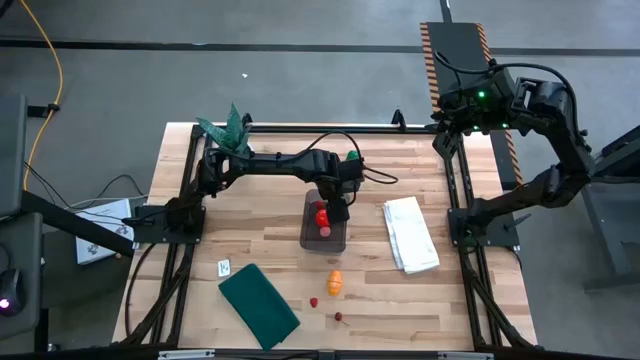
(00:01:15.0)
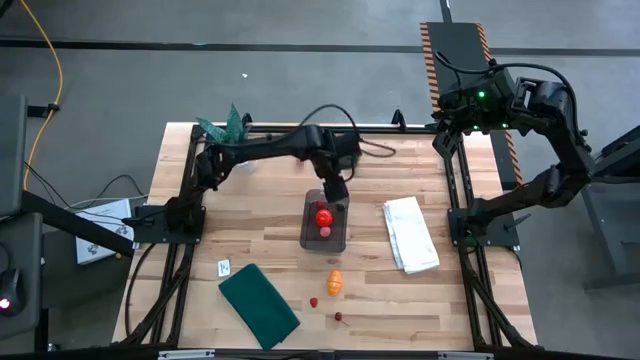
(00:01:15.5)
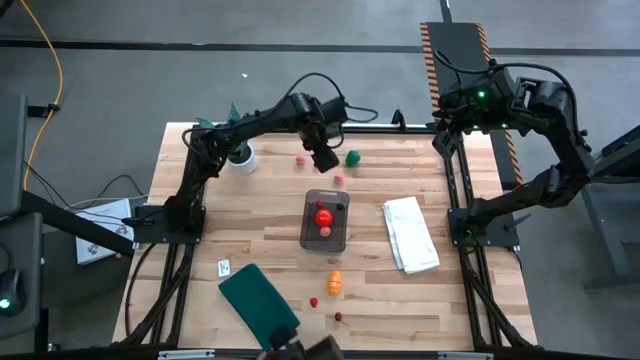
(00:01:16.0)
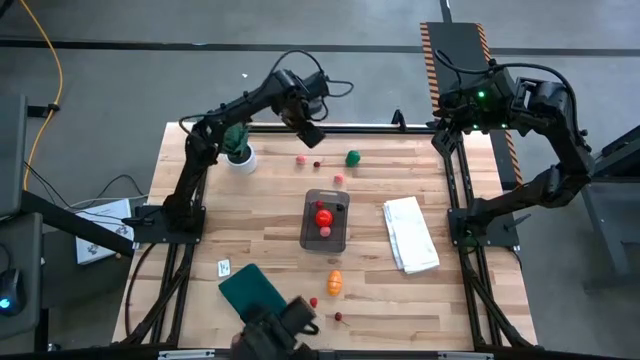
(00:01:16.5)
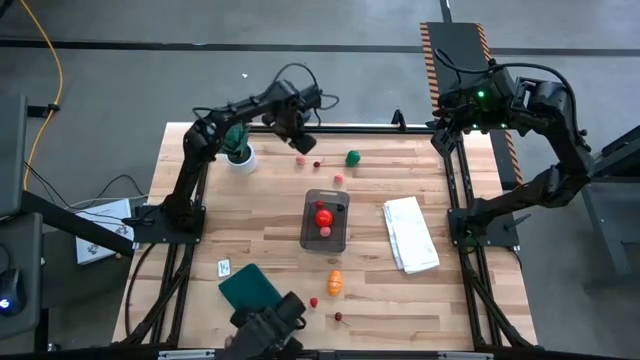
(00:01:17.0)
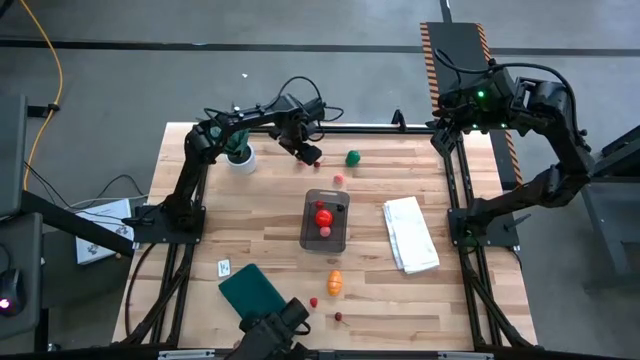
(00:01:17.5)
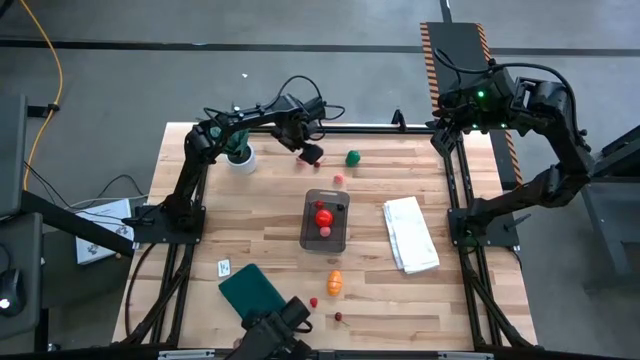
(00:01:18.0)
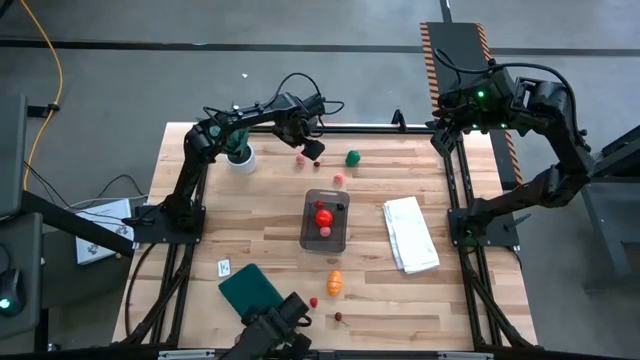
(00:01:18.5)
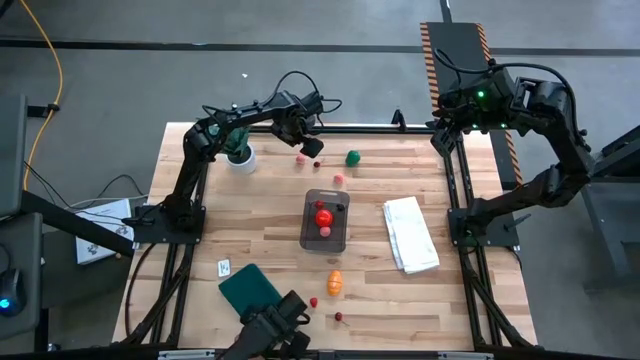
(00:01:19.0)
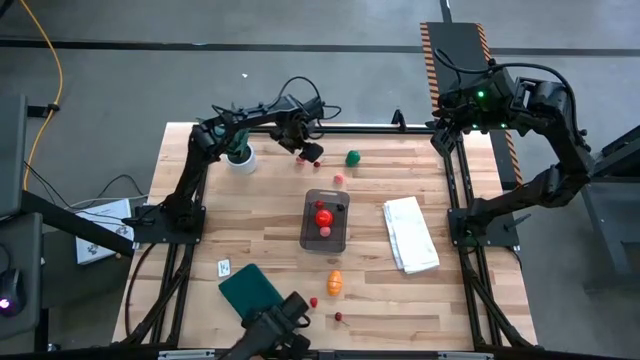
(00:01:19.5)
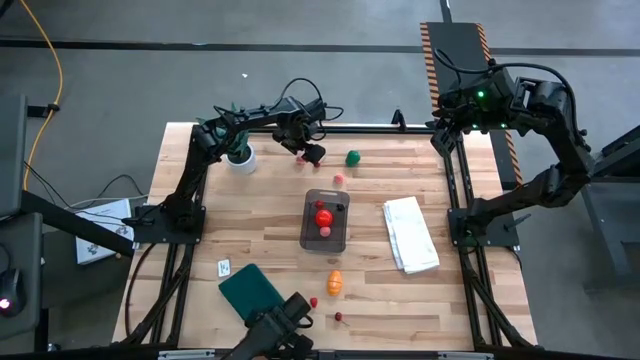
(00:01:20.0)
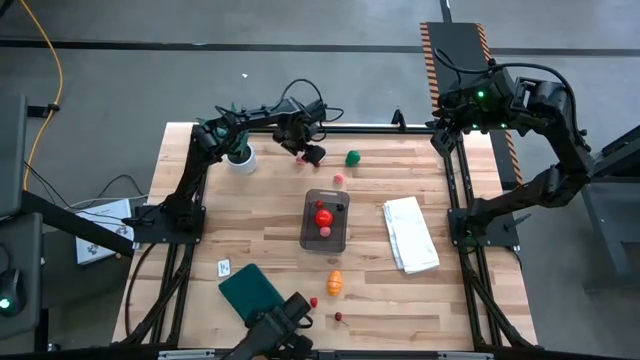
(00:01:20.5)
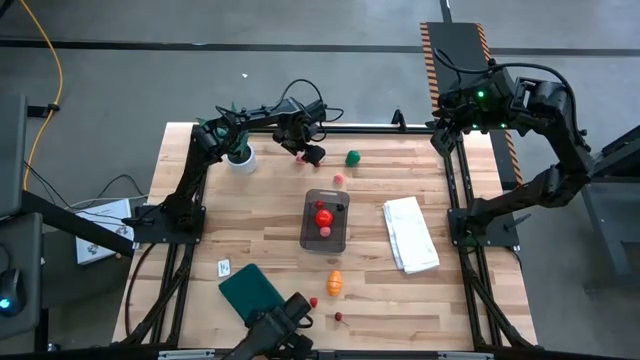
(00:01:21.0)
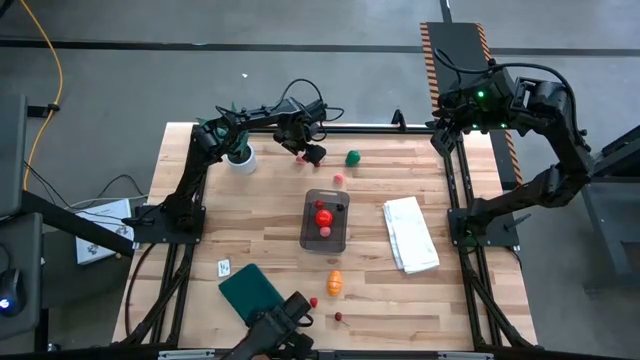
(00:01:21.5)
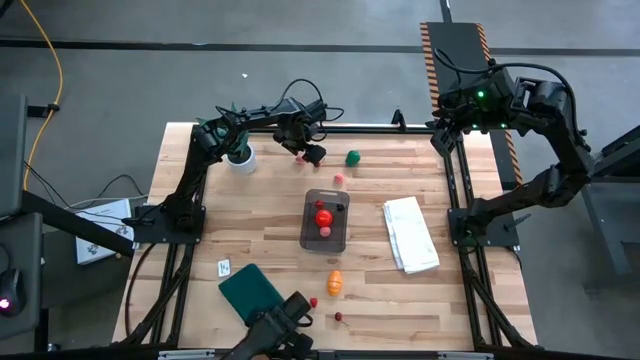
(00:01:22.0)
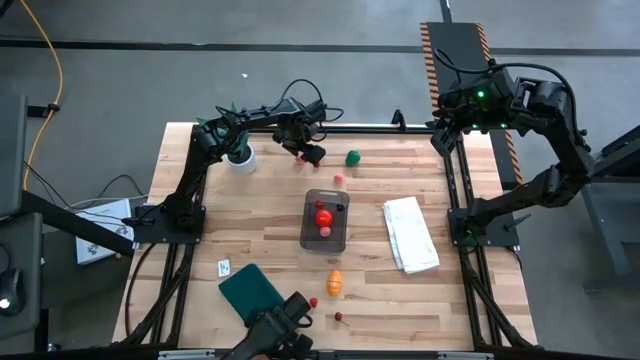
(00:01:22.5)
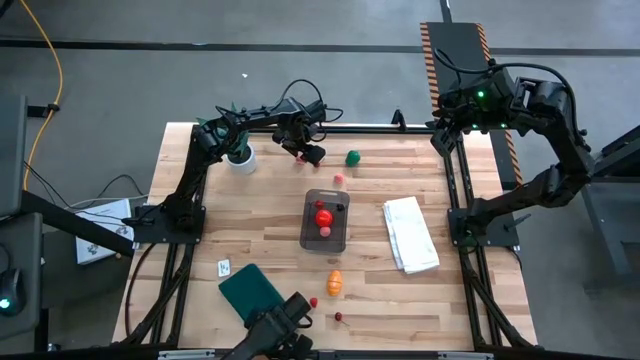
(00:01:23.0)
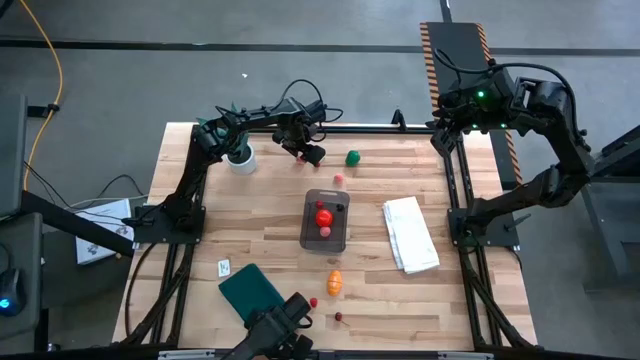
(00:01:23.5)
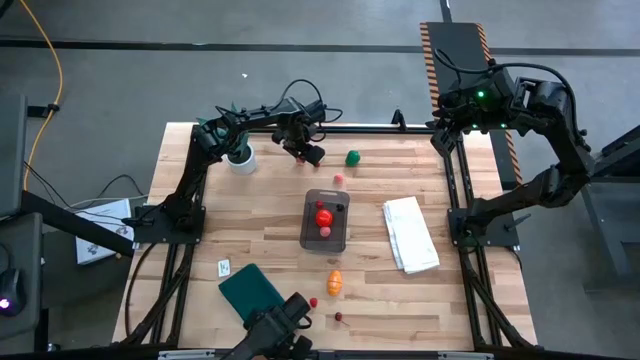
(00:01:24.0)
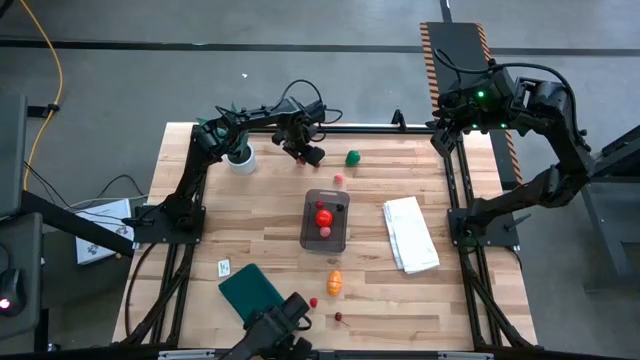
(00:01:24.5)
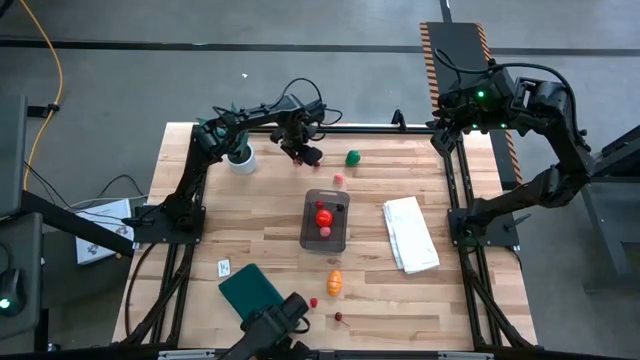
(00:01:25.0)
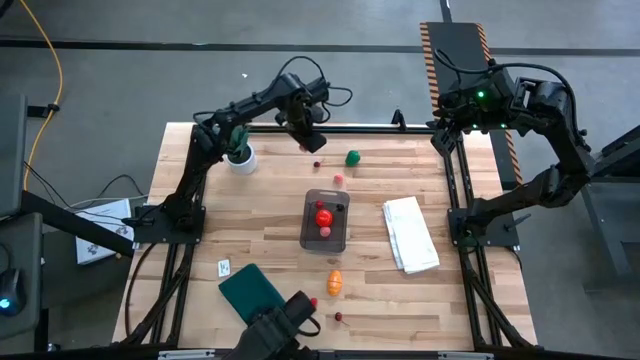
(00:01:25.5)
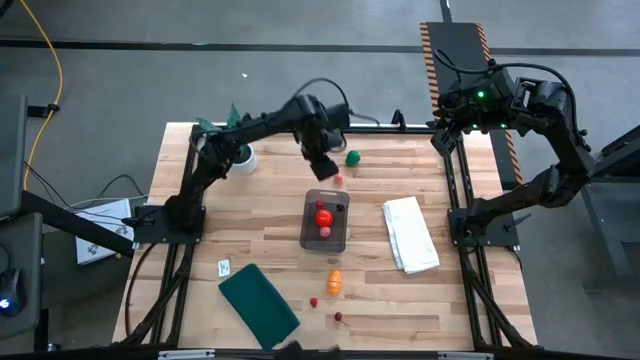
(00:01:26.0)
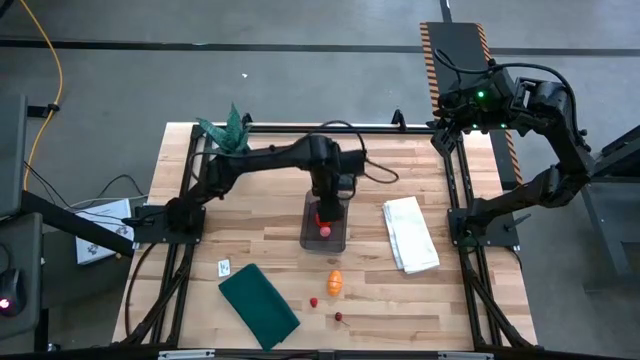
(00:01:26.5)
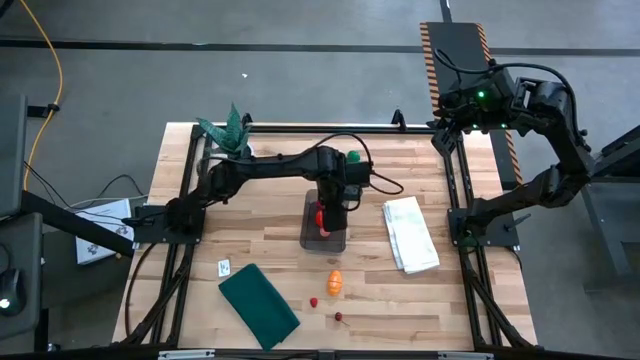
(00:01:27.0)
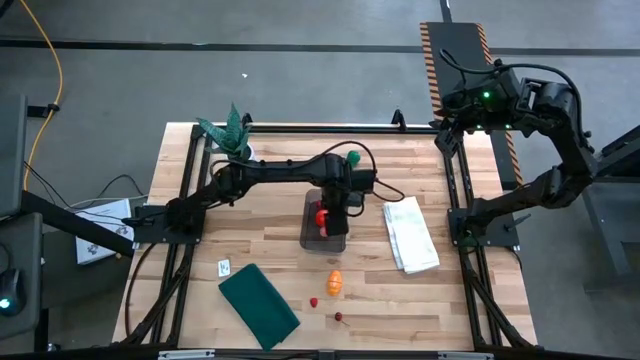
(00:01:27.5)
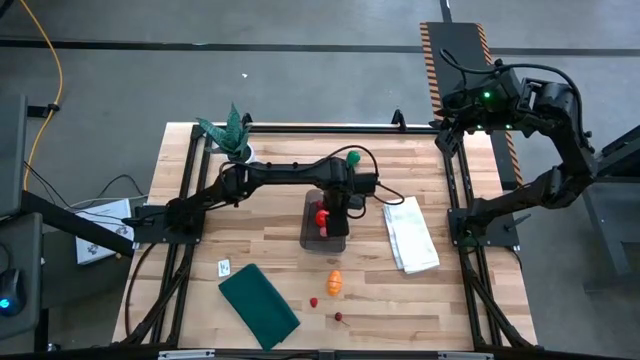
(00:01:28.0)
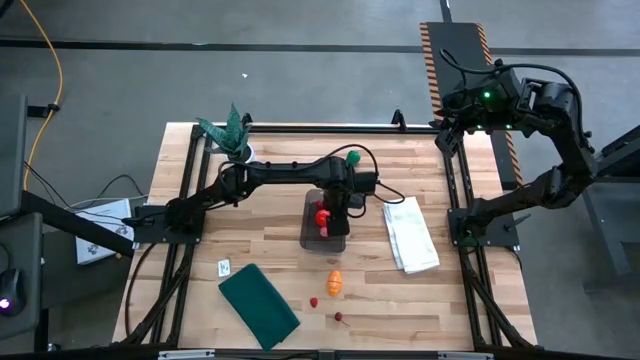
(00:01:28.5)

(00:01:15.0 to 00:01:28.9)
Task: Pick and placing Produce into tupperware
Put the pink peach into the transparent black bin

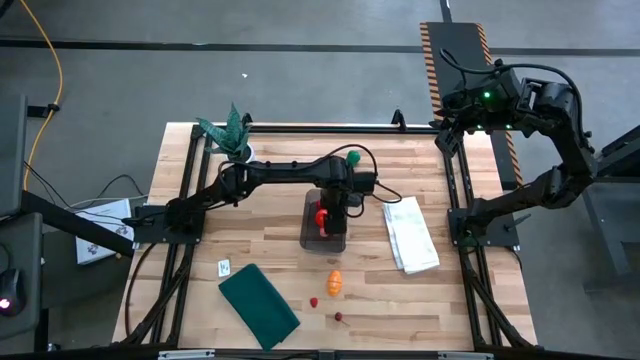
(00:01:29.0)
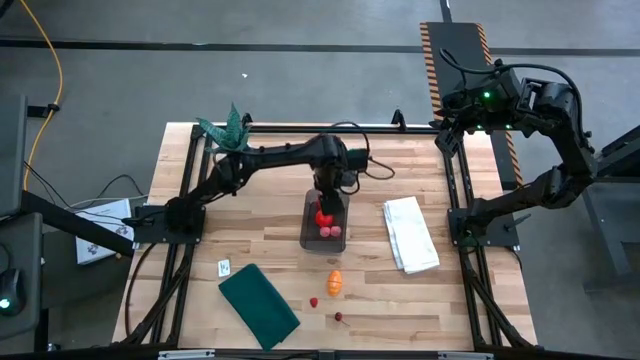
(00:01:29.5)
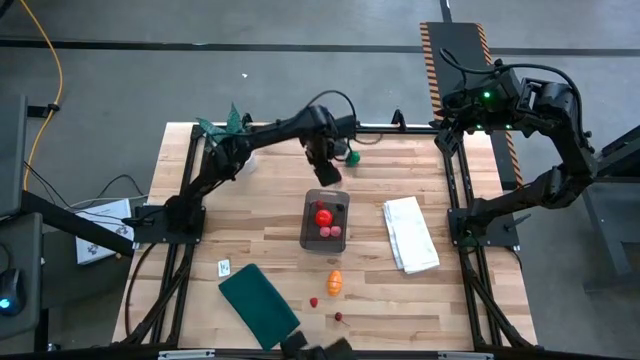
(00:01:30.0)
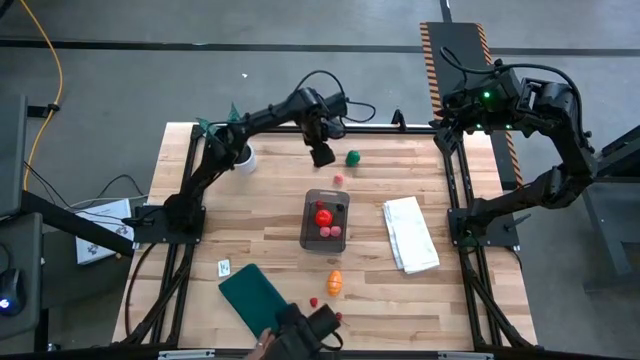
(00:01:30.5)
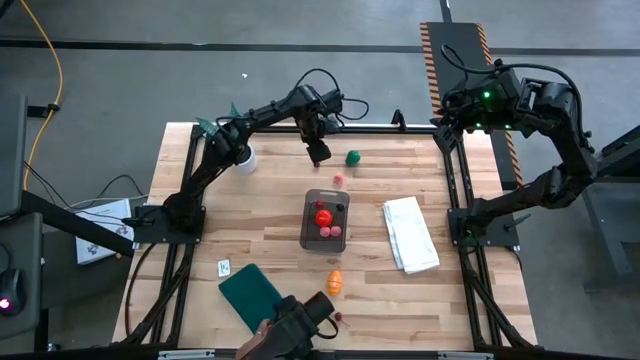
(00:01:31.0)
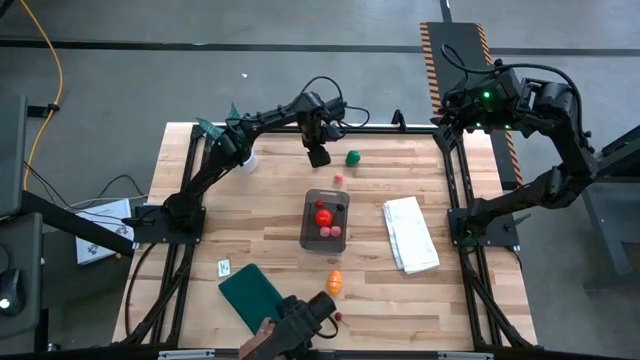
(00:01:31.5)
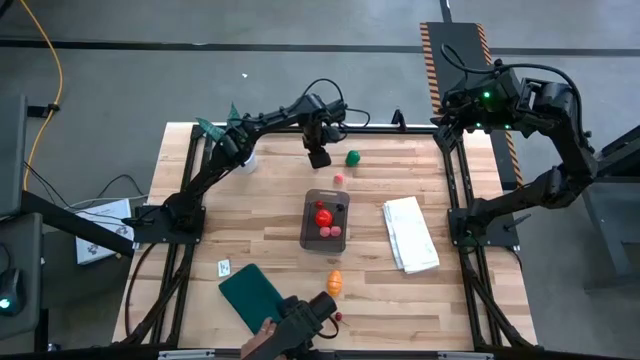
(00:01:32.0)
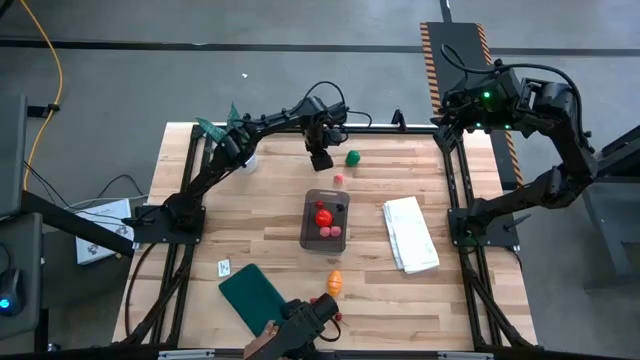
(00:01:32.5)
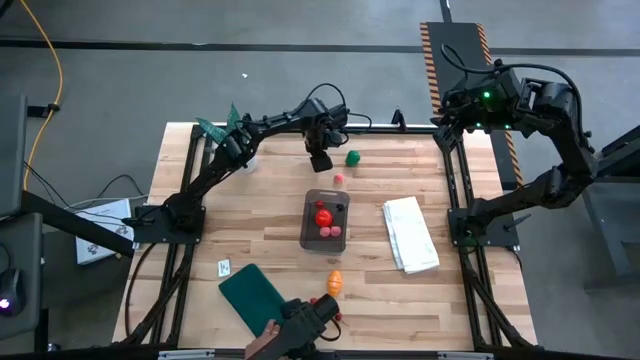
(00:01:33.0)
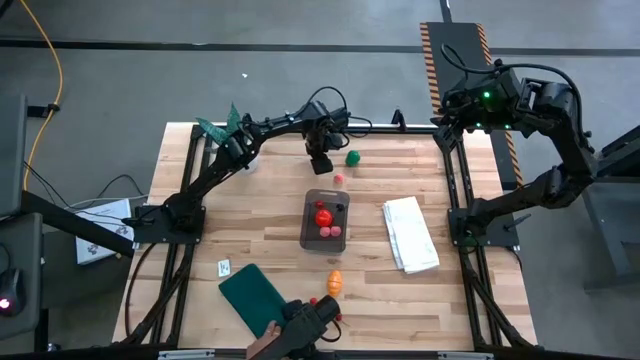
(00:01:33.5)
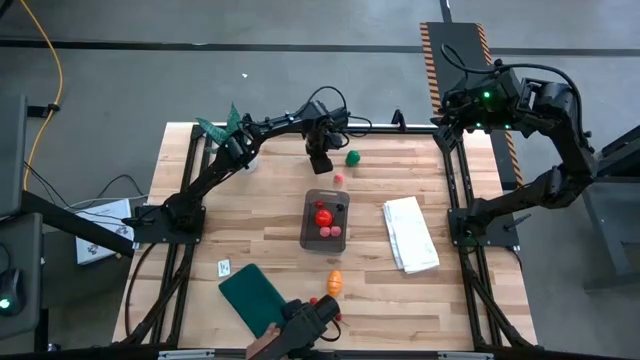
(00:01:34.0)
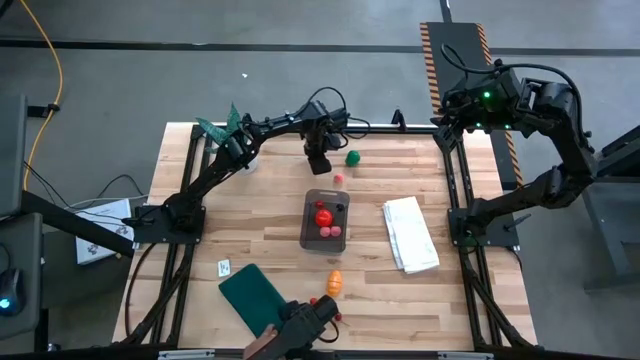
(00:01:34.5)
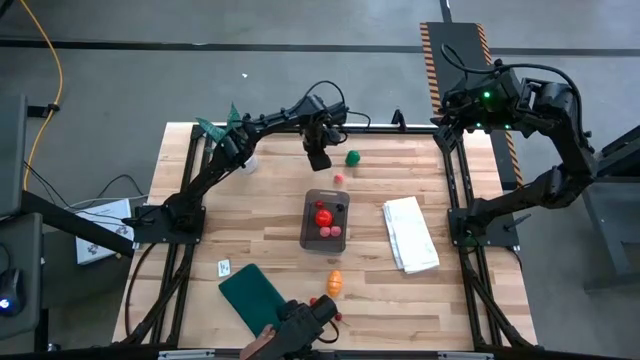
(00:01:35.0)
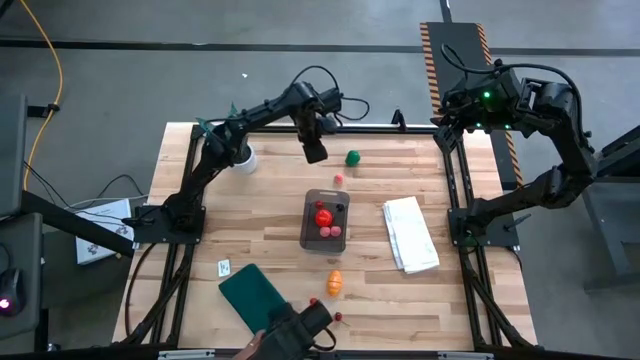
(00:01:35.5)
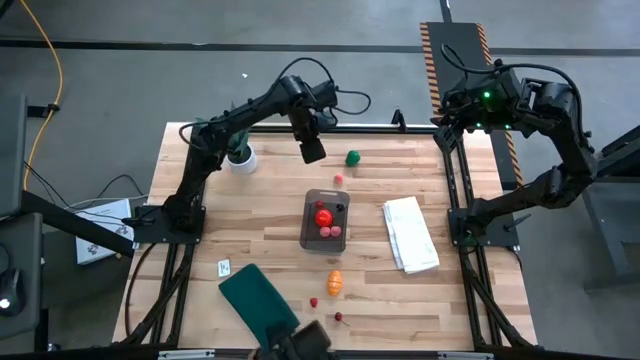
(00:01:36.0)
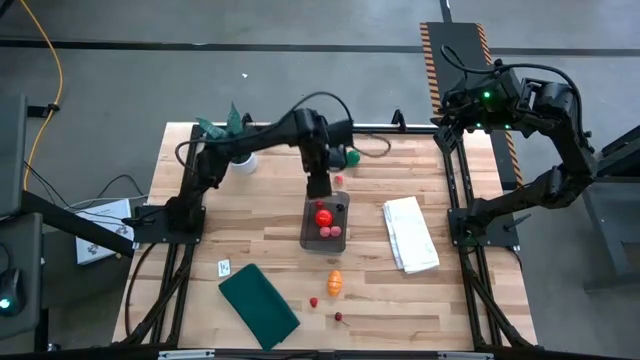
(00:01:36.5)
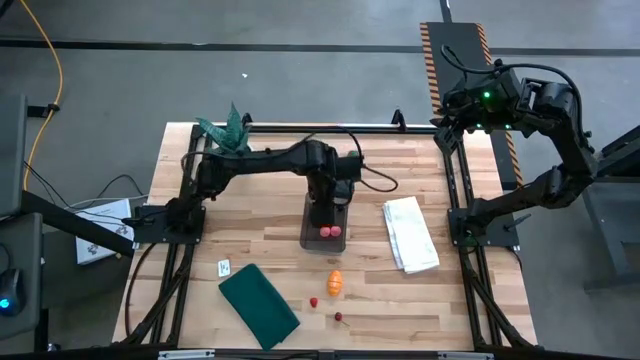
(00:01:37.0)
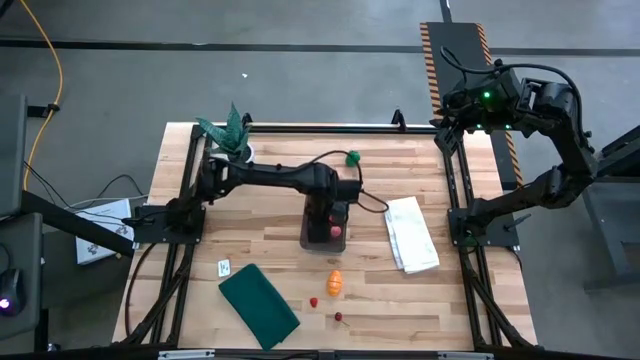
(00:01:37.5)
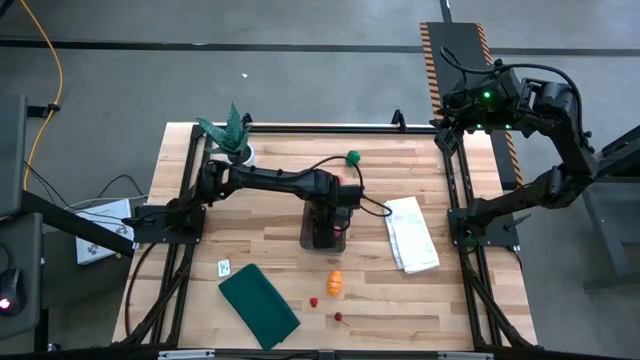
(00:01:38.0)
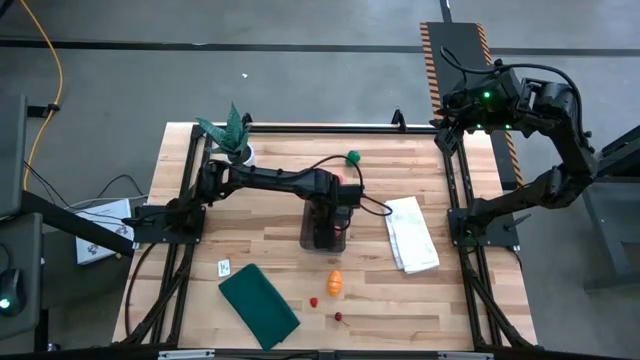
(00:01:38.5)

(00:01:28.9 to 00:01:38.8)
Put the red cherry into the transparent black bin
